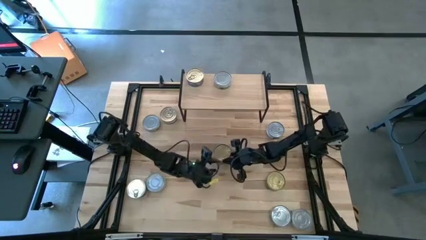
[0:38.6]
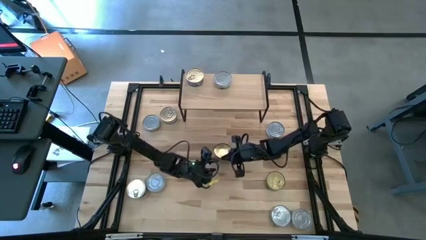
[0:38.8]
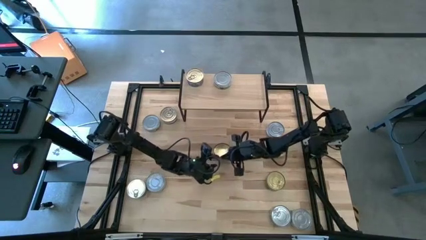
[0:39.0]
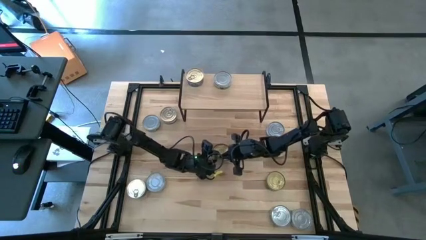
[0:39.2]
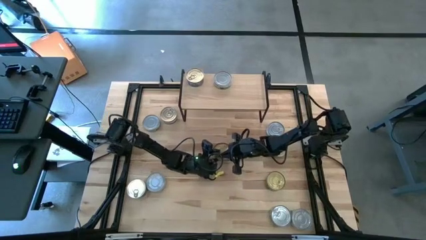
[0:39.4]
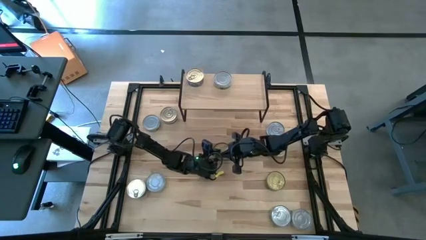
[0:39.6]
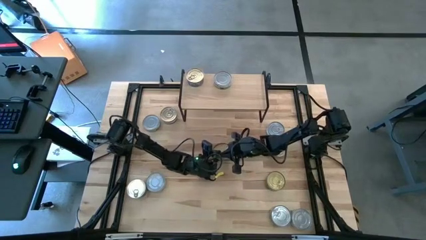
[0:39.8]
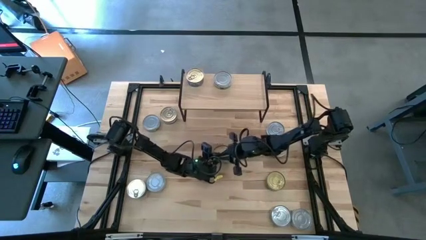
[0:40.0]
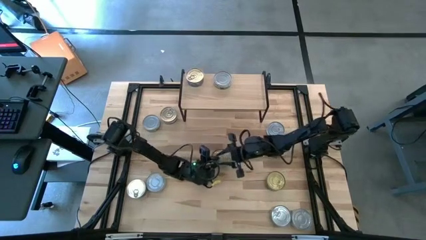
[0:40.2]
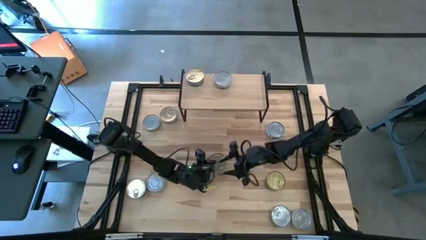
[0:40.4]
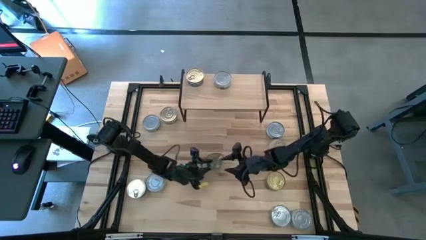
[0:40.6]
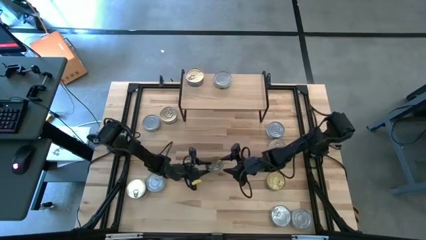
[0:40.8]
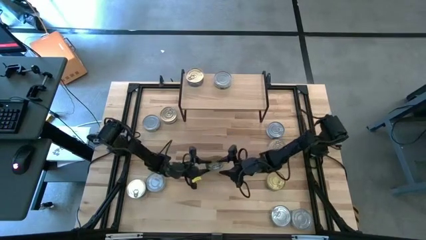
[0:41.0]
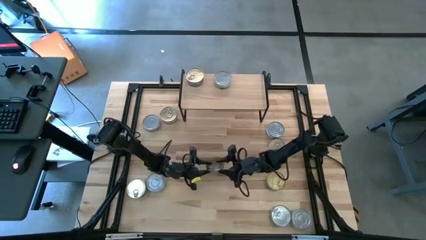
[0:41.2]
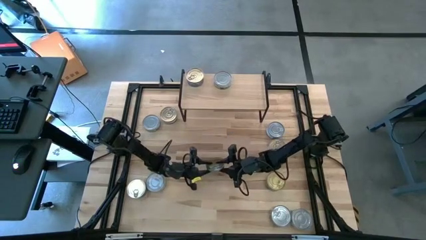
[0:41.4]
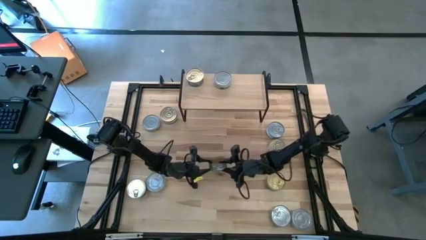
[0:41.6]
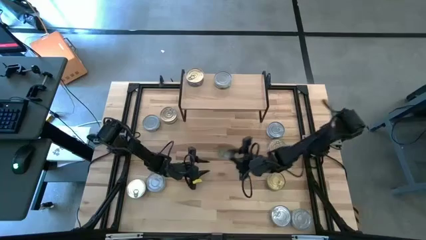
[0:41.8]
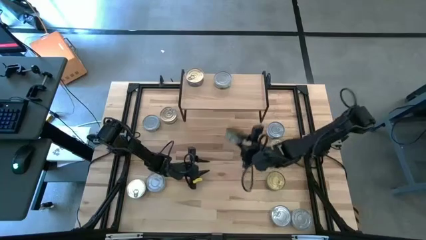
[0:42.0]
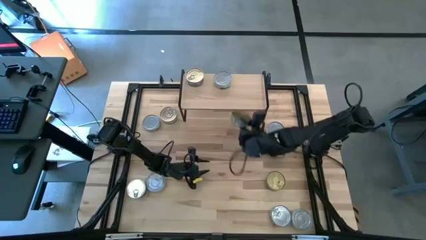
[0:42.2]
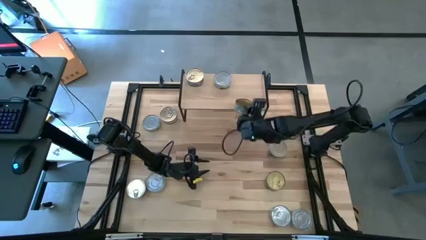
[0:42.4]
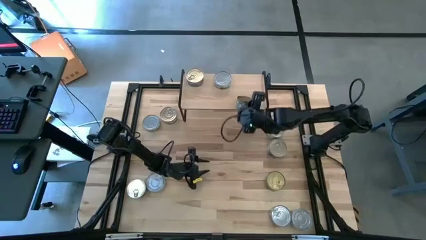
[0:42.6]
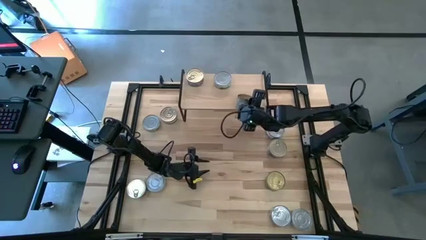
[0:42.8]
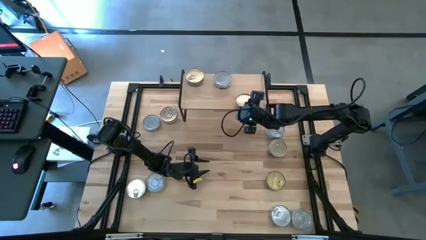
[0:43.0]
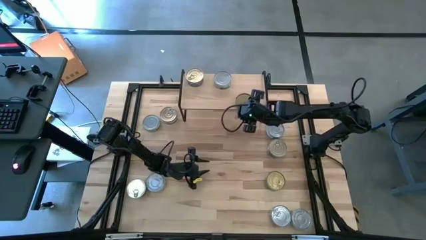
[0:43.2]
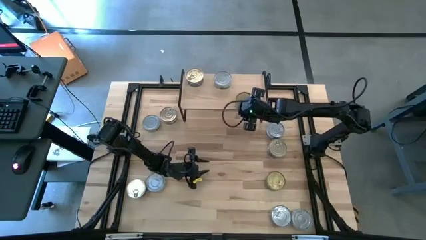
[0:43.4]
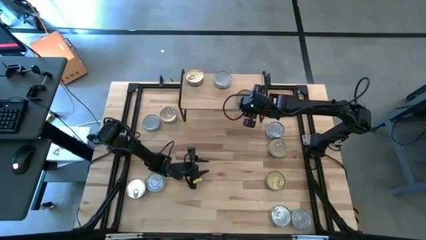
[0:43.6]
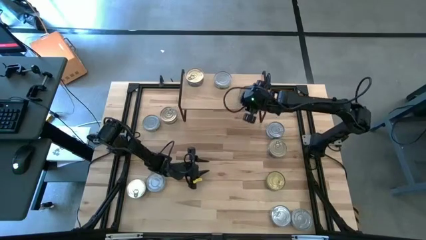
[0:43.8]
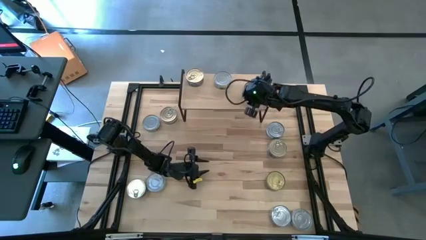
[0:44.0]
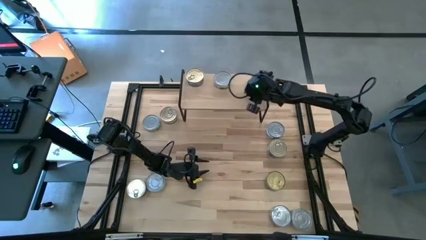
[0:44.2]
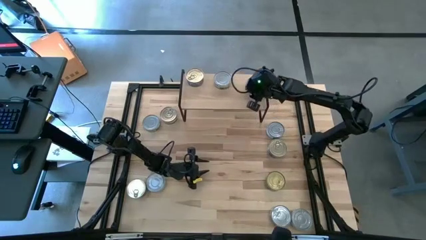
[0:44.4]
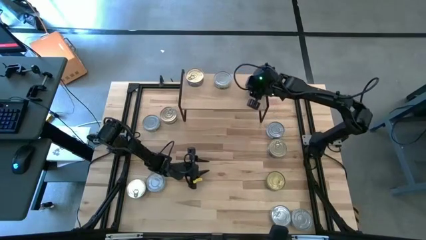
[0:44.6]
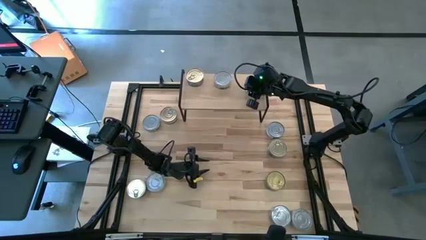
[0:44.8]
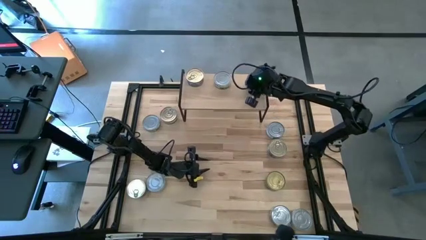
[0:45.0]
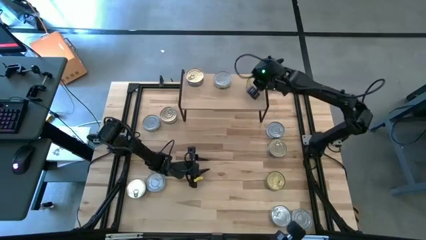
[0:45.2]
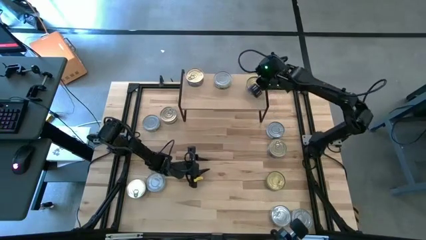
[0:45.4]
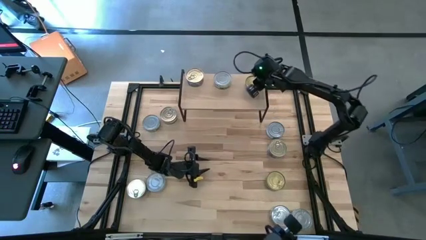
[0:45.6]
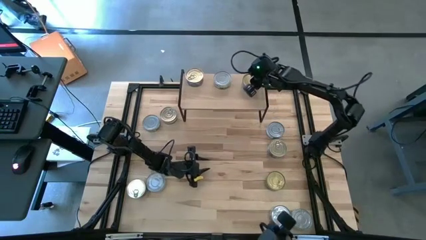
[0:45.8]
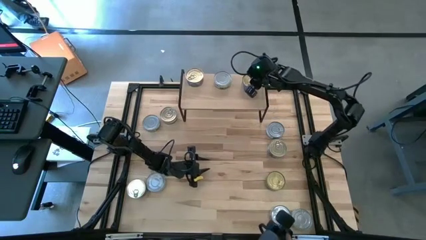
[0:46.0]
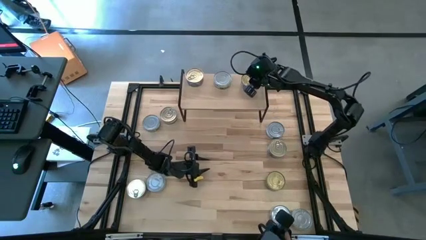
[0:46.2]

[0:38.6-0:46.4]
Task: Stack canned seafood by type on shelf
Put the green with blue patterned tuna can on the shelf

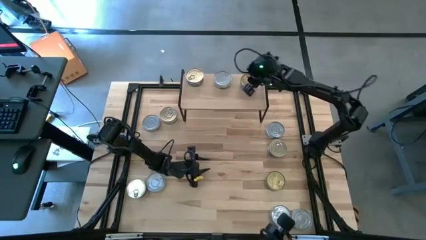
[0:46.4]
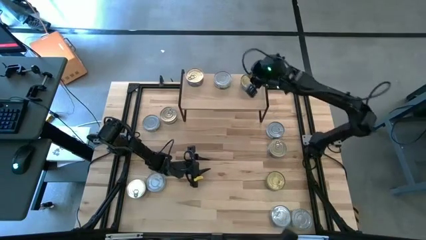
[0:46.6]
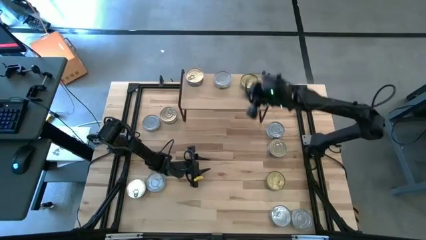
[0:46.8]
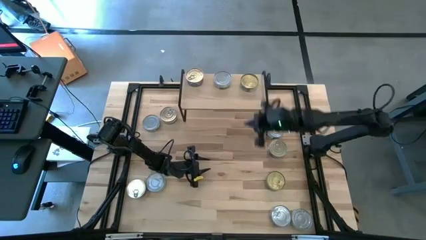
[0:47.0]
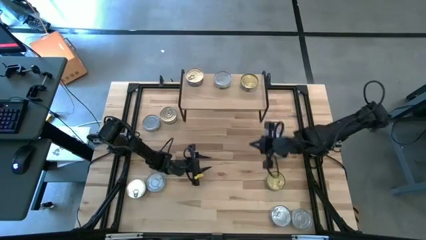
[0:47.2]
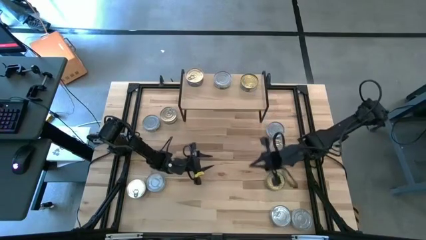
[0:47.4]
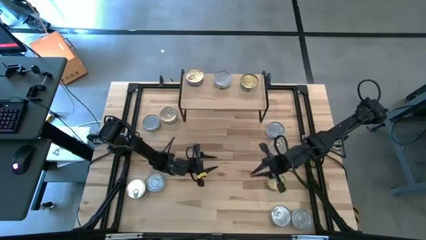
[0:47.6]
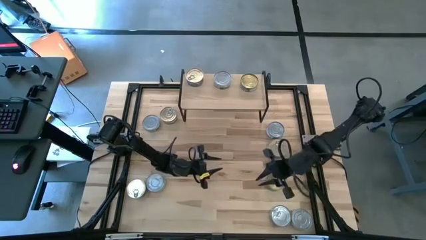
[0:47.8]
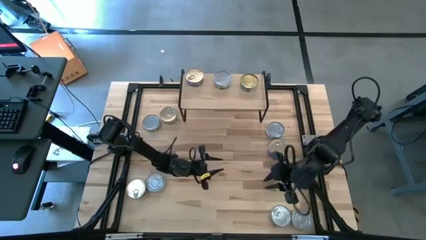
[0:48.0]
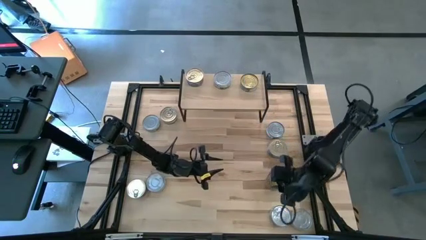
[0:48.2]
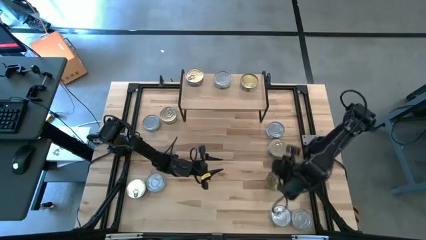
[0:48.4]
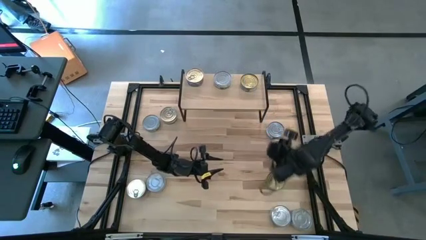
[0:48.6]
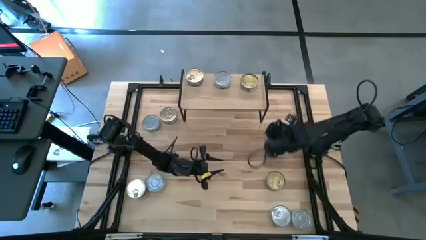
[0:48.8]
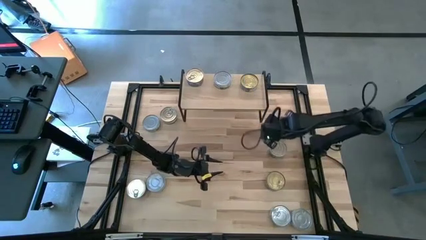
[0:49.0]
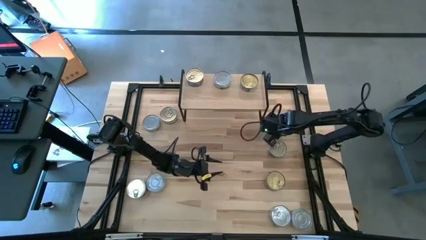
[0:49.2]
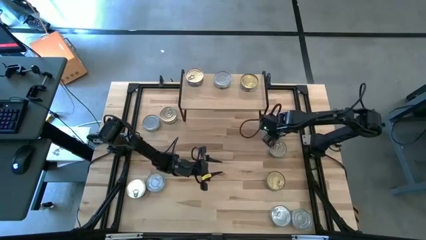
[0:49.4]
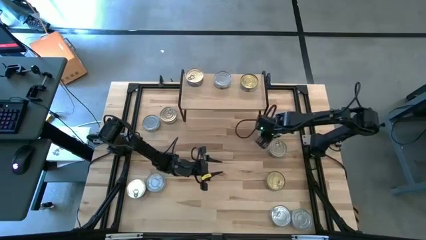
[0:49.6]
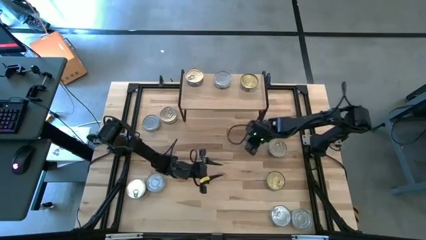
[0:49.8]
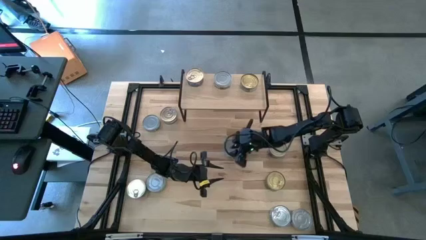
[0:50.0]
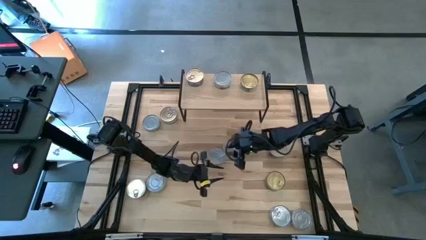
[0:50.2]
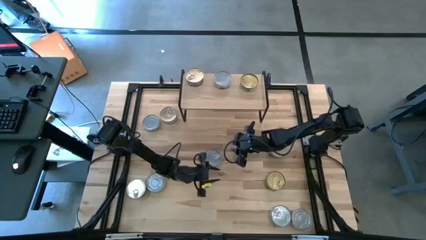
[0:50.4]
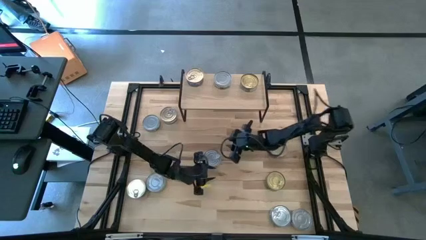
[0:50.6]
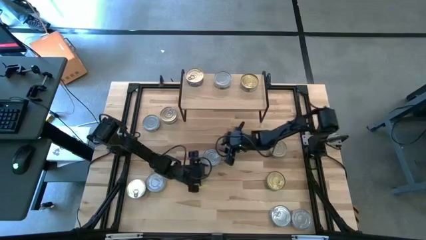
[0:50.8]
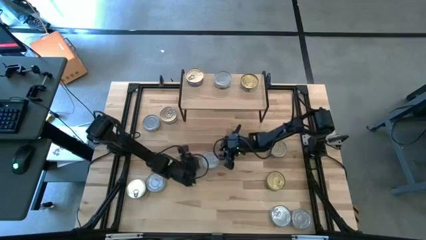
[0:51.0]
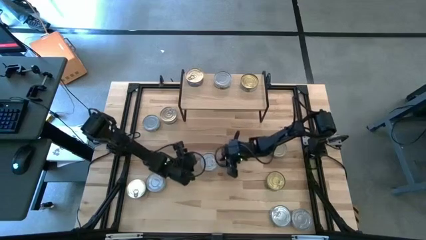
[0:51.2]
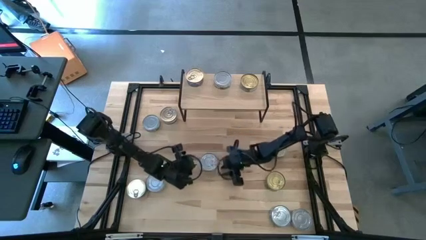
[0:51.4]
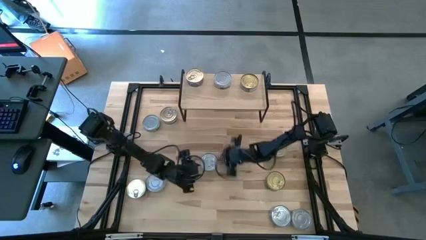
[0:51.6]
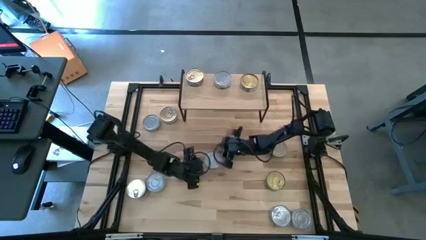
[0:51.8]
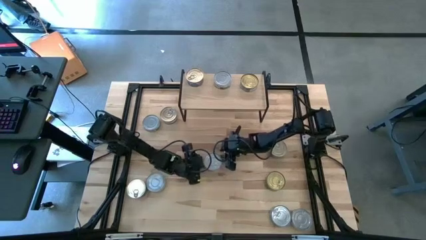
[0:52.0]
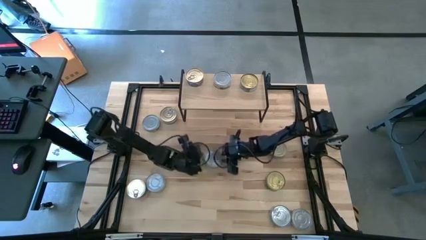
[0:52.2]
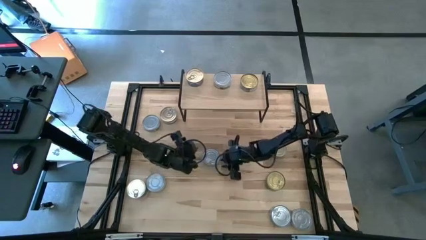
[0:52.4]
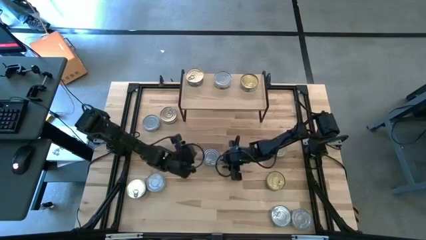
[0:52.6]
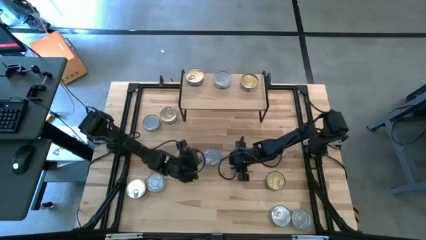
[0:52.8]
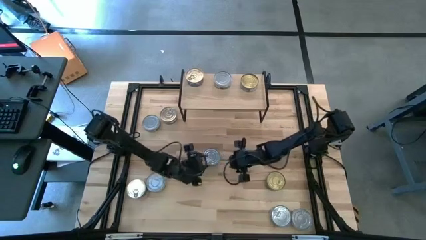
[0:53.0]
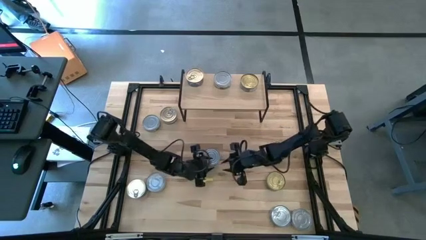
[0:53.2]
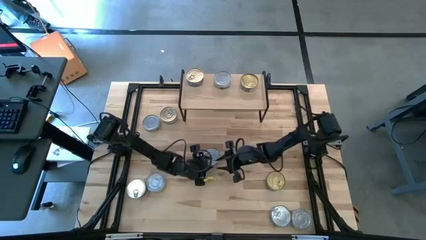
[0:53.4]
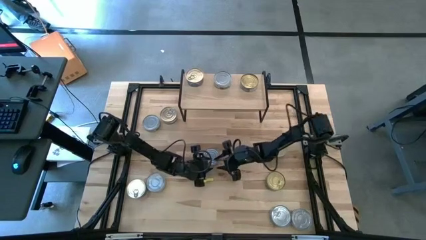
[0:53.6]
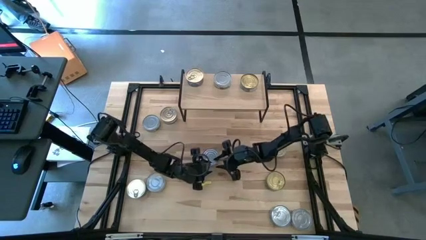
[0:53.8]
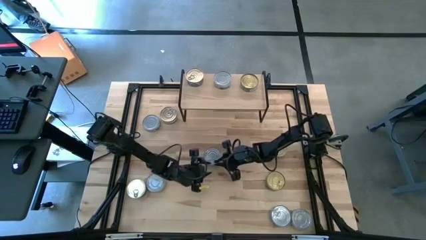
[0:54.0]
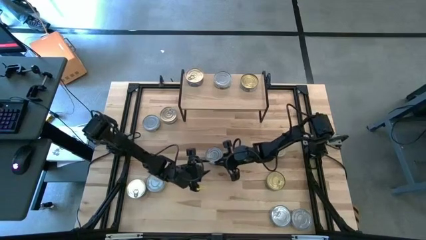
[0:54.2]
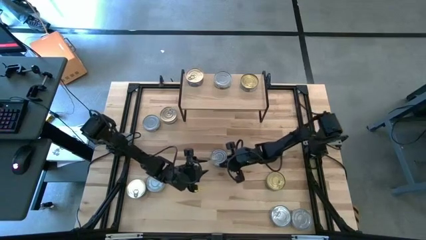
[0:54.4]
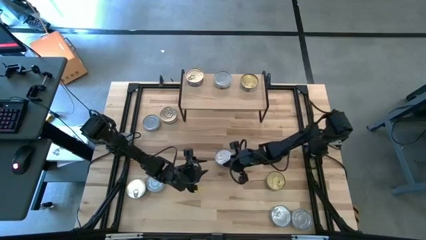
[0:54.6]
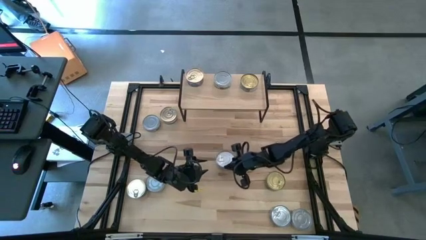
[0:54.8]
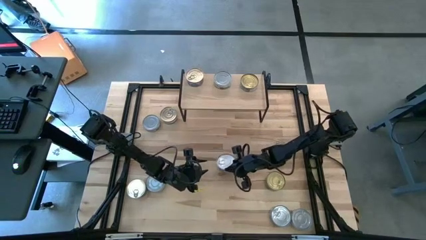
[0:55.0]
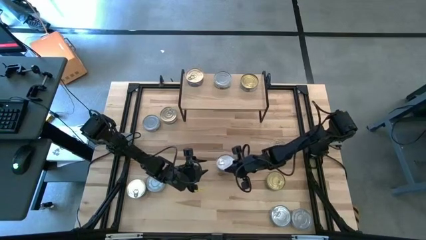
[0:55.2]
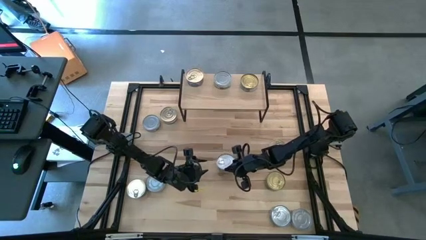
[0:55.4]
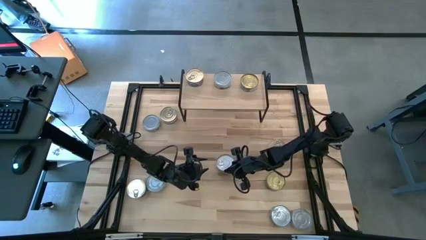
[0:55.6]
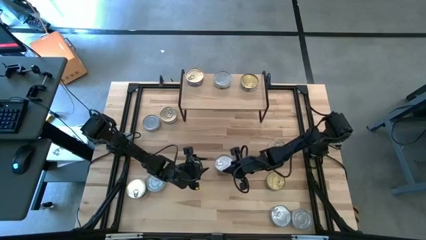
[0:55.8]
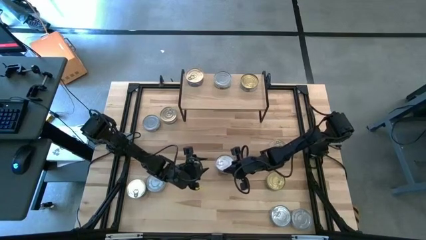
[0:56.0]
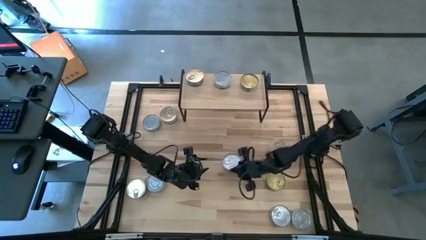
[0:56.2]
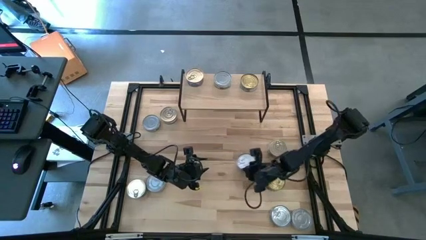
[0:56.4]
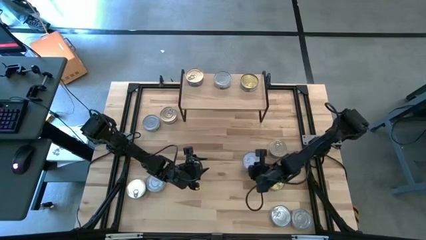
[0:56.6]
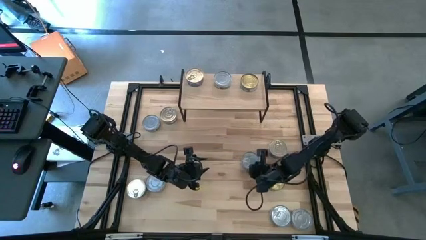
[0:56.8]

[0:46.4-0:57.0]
Put the green with blue patterned tuna can on the shelf
